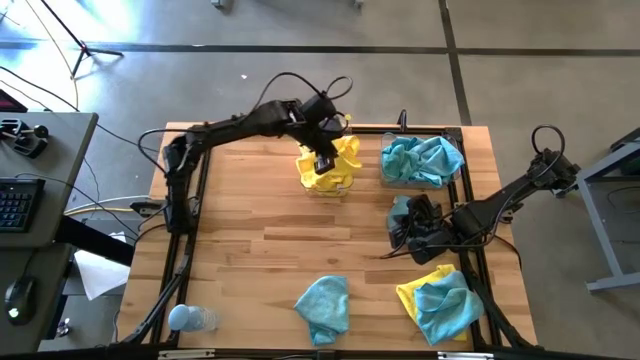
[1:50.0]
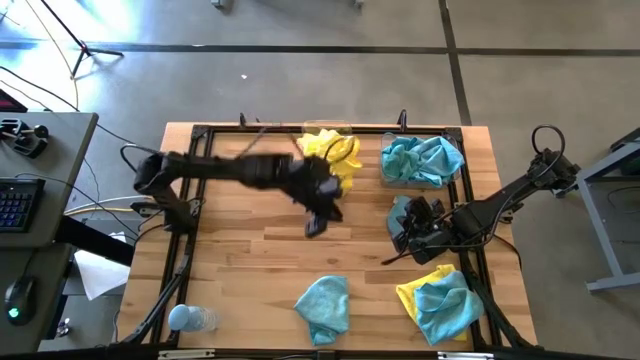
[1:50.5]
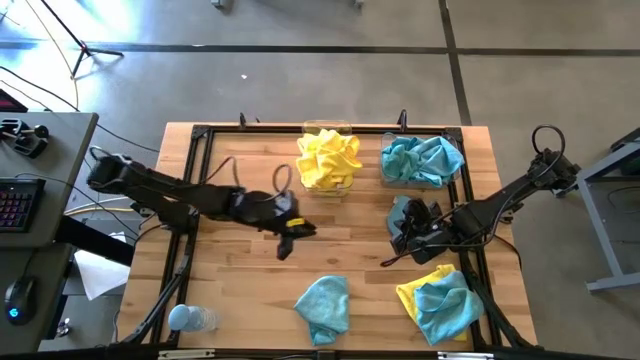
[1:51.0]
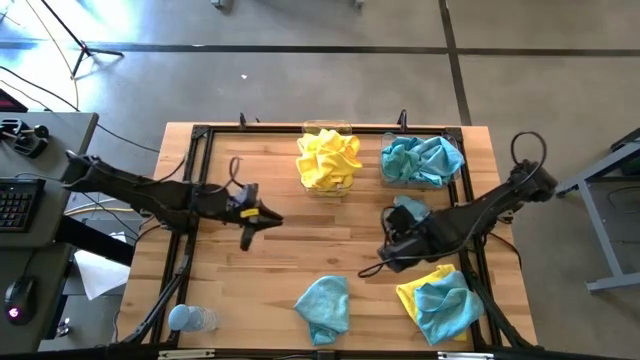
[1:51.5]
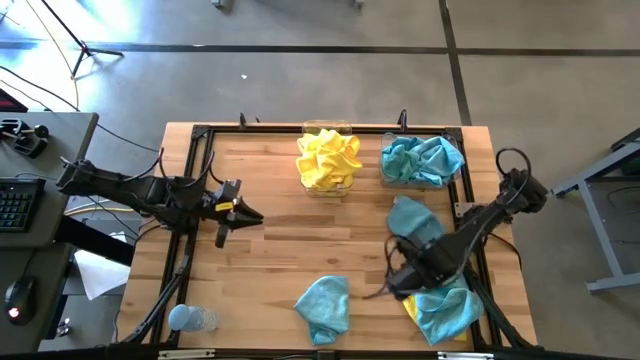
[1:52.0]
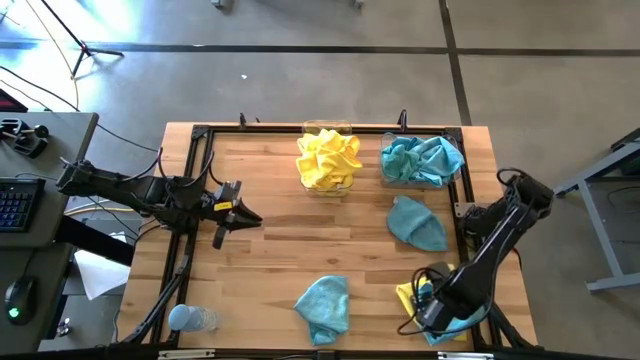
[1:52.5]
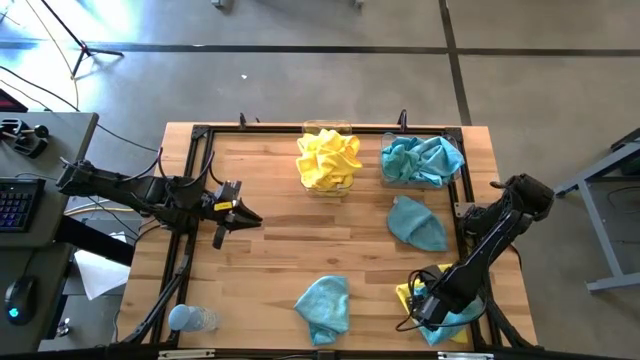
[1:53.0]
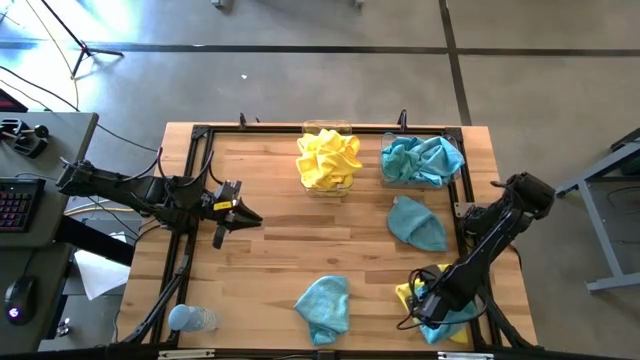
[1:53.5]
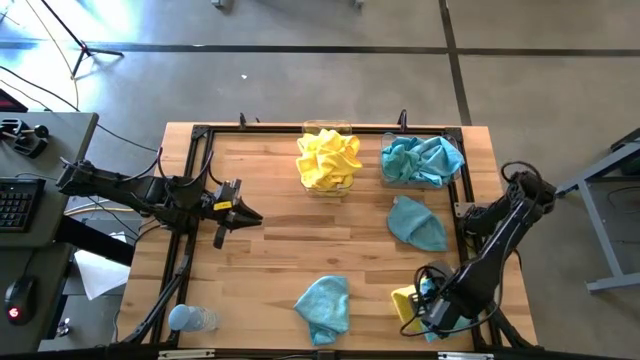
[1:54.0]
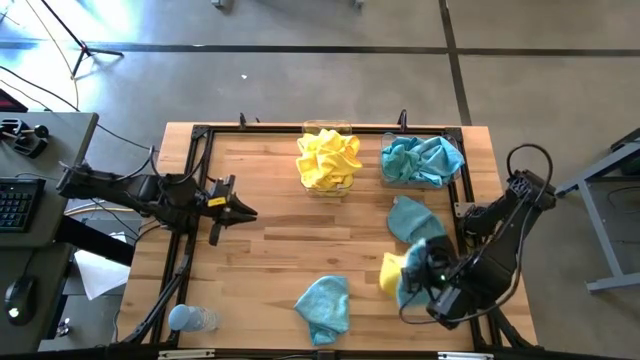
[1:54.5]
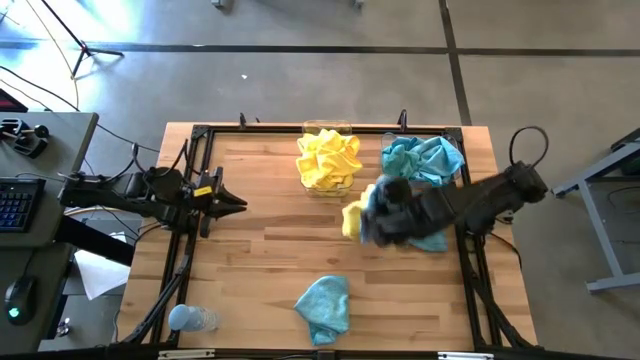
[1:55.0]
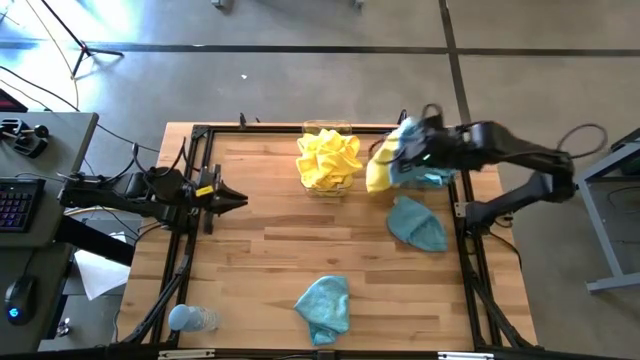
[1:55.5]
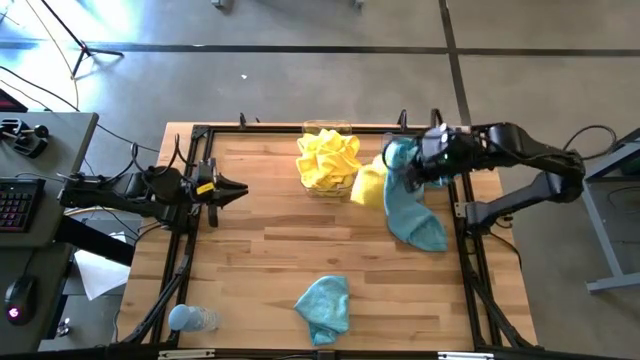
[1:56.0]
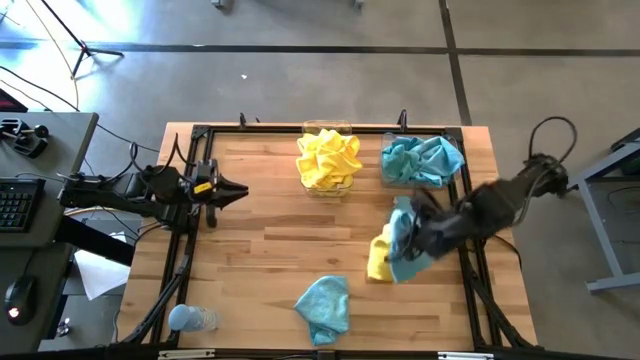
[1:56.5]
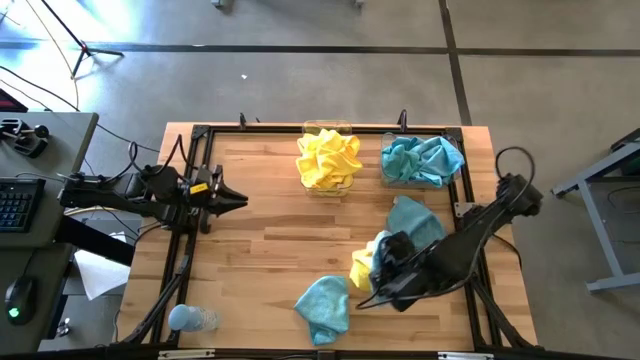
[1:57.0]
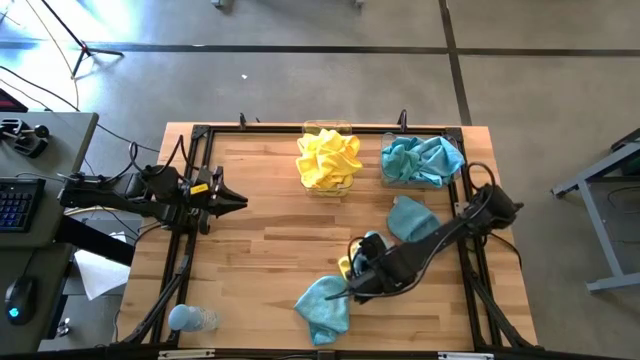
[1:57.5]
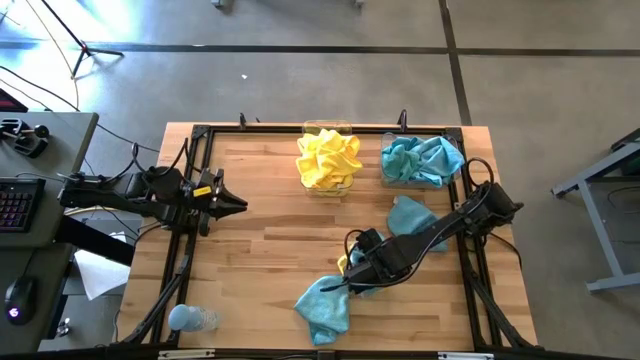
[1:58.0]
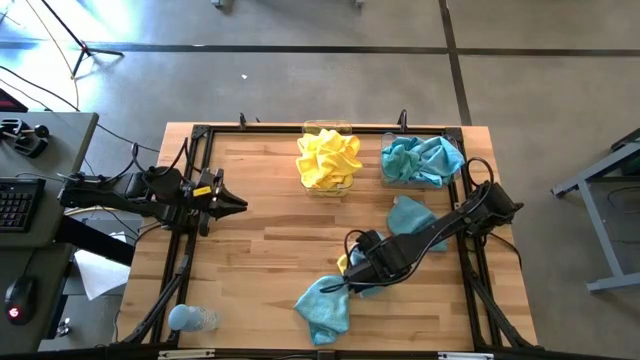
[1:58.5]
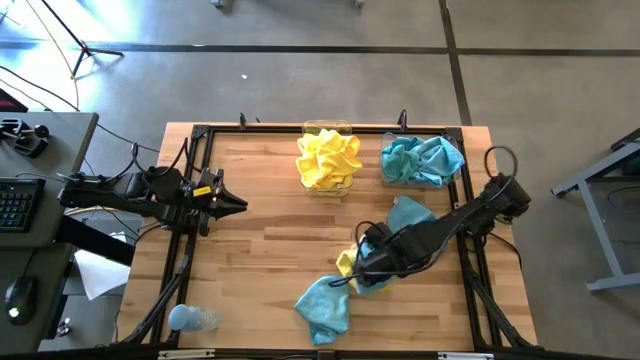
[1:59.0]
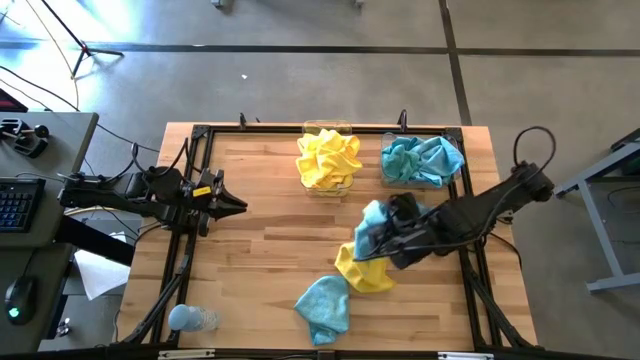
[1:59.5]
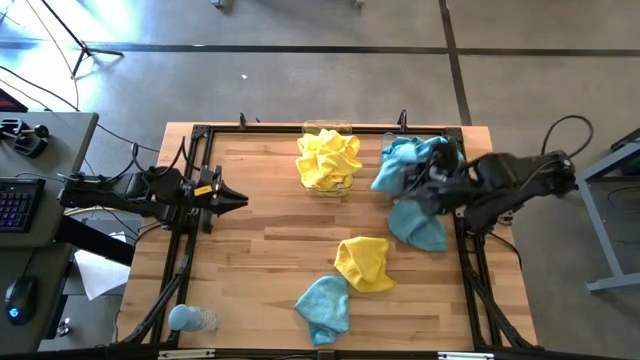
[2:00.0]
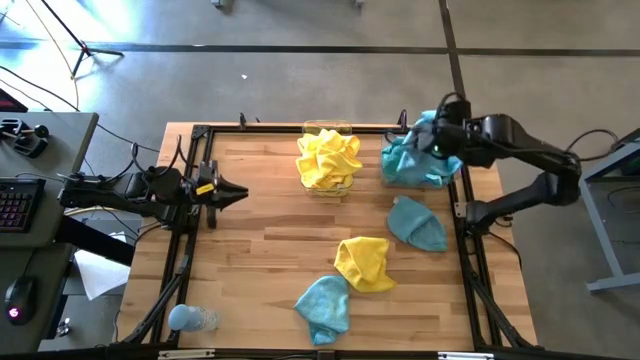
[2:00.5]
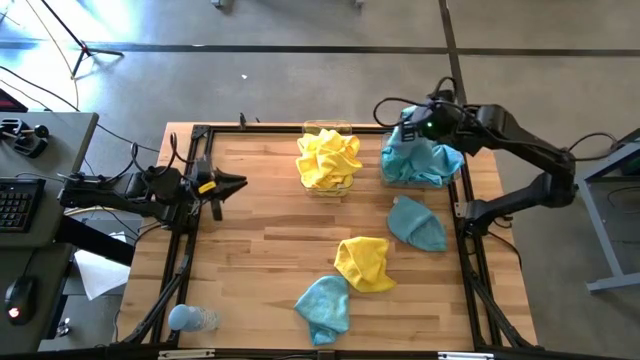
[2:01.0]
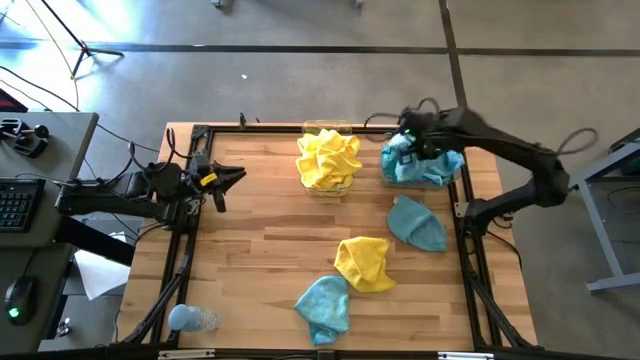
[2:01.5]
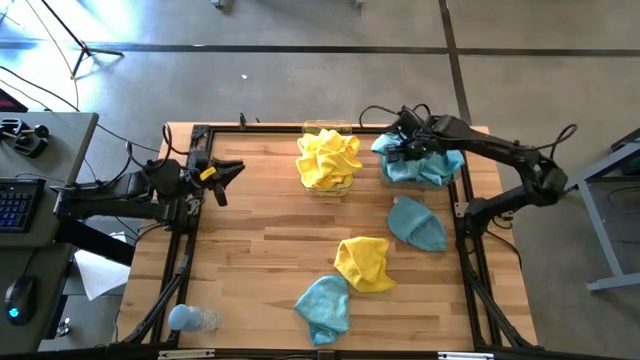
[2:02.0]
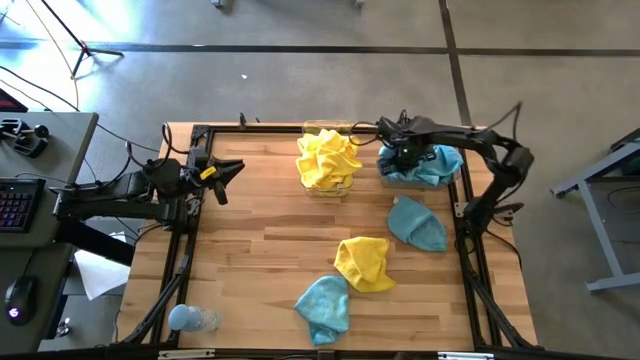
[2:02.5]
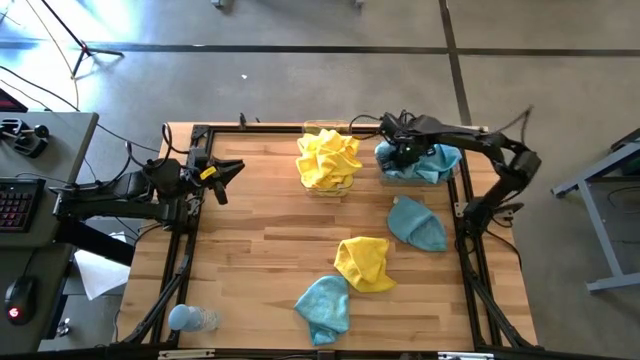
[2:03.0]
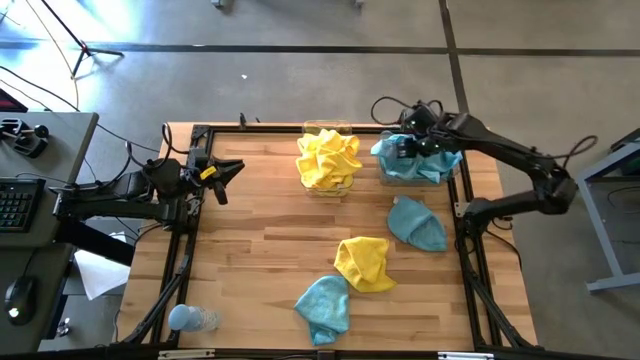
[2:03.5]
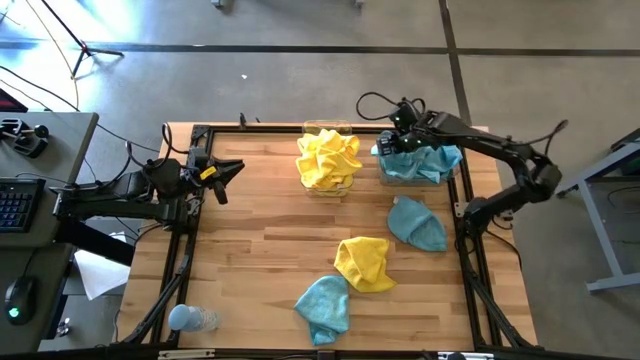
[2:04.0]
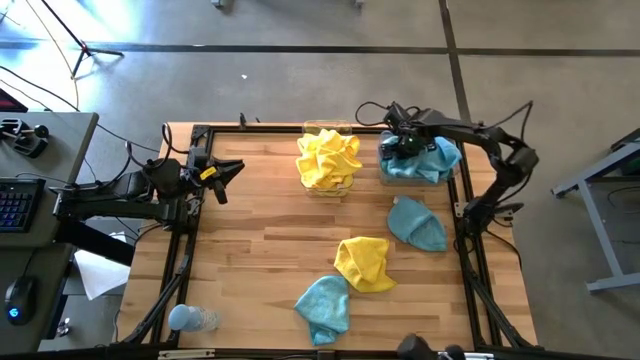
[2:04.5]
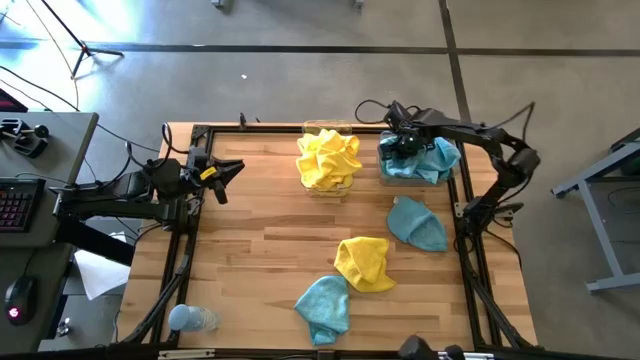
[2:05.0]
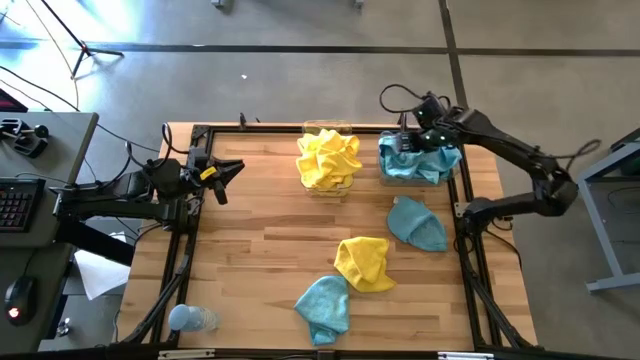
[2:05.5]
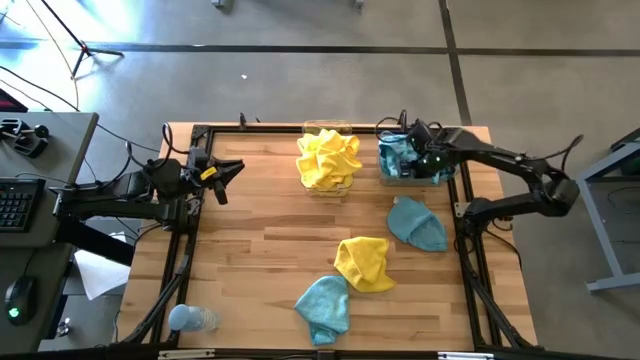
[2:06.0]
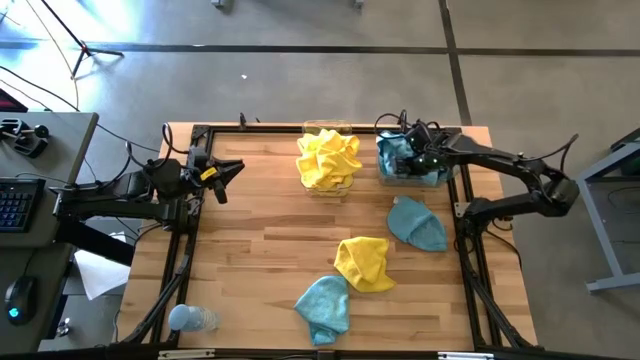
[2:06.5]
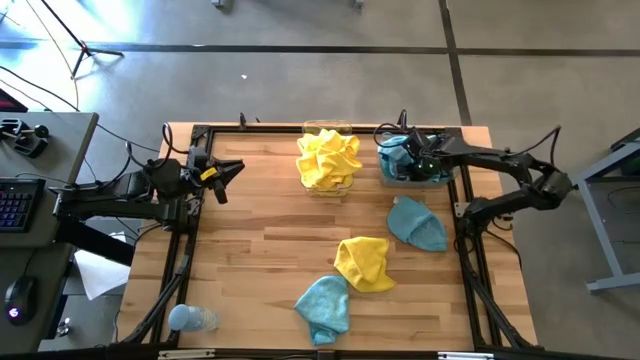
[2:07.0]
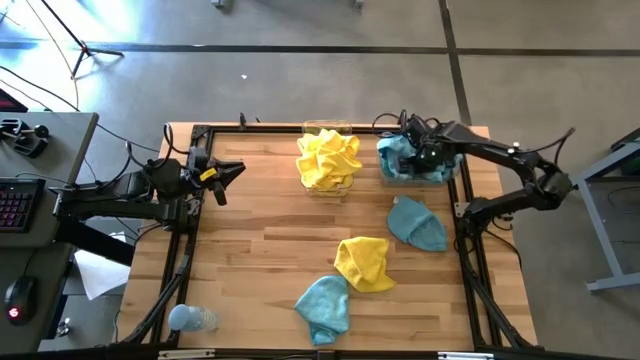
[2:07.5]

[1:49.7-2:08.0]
Task: Sort microfiber towel by color & place in baskets
Put the blue towel into the right transparent bin

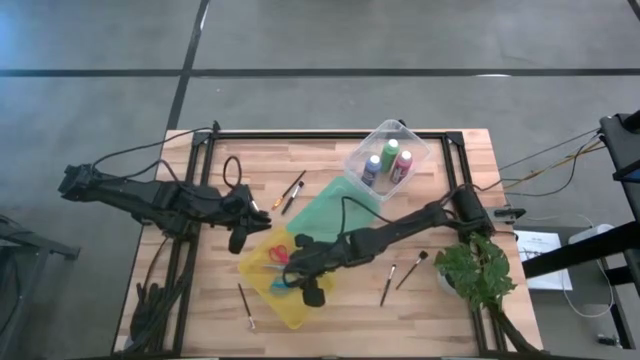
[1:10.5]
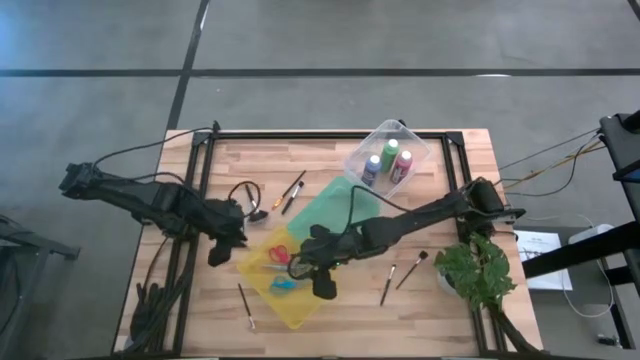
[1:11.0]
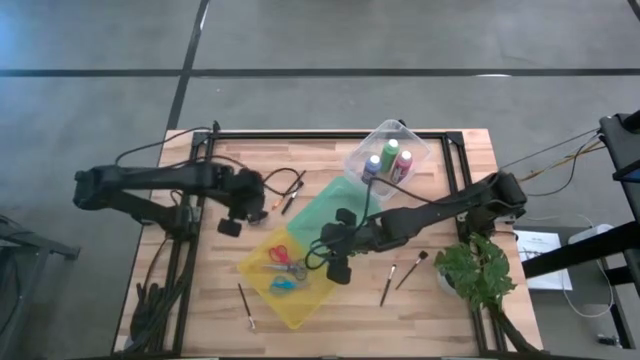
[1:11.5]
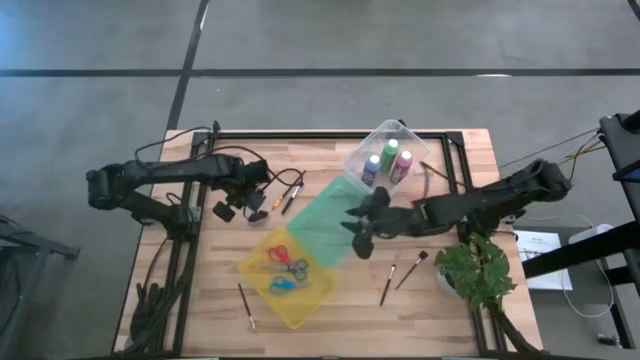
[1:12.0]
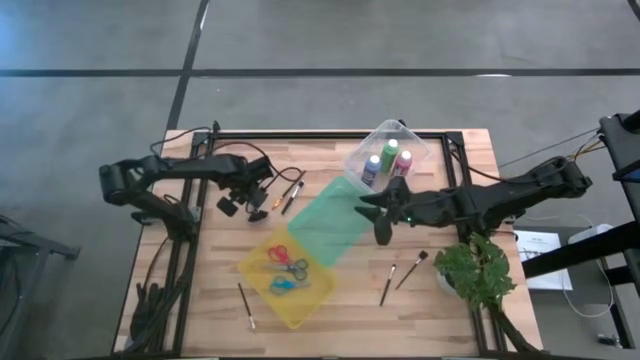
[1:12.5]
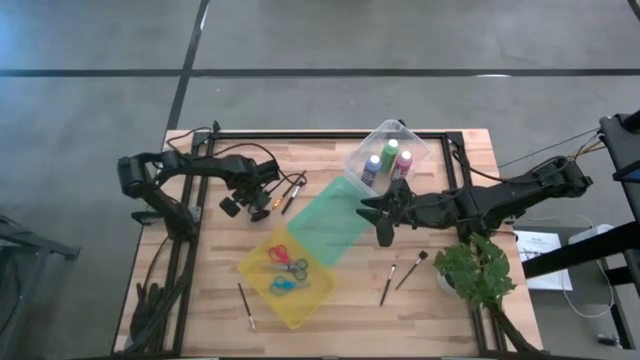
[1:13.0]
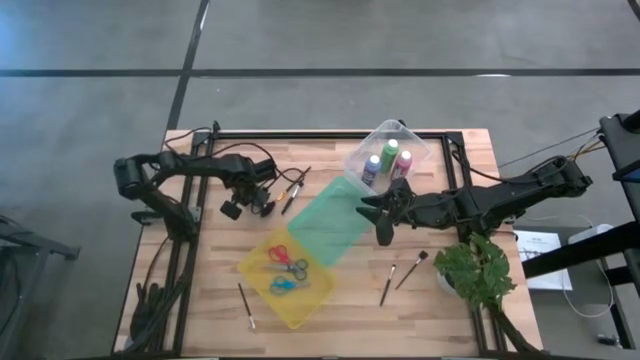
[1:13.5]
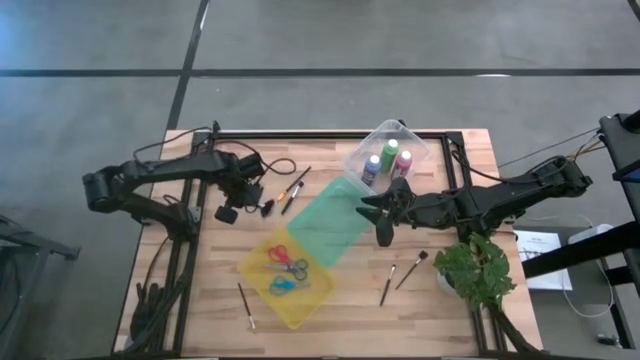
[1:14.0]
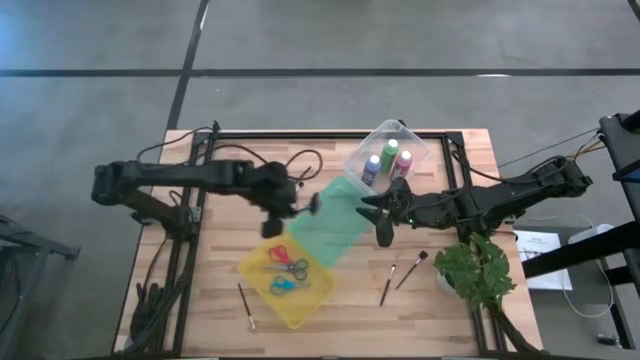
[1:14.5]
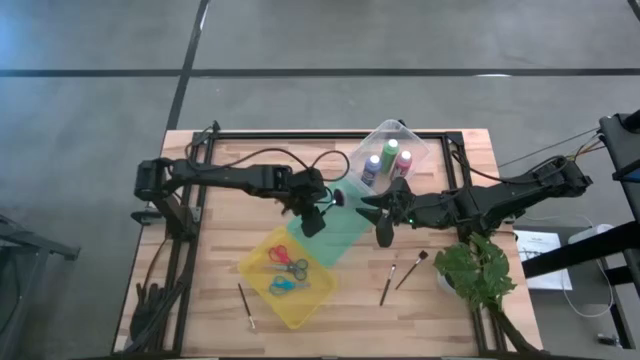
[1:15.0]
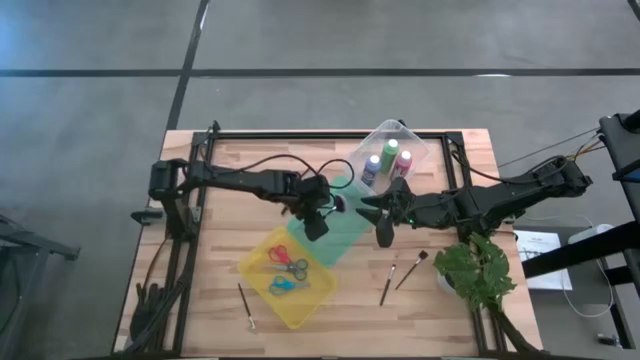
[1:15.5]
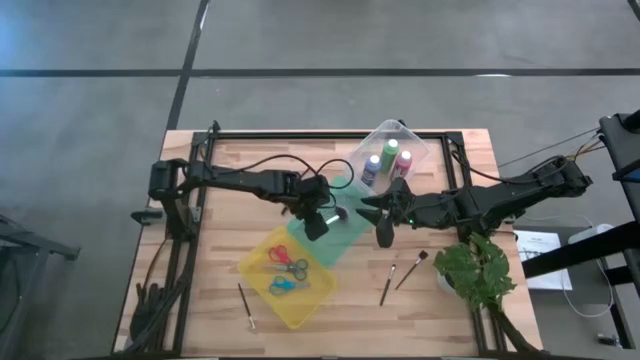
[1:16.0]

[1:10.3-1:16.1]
Task: Pick & Place Paint Supplies
Put the black highlighter brush into the green bin
